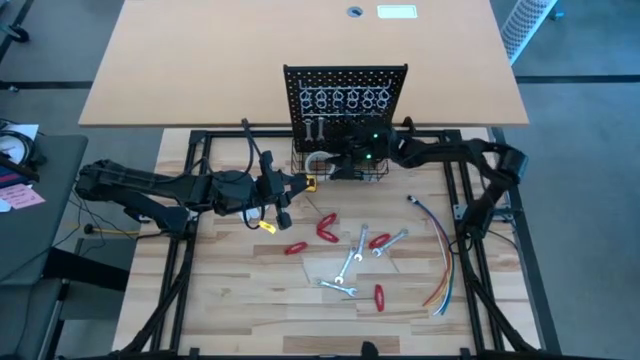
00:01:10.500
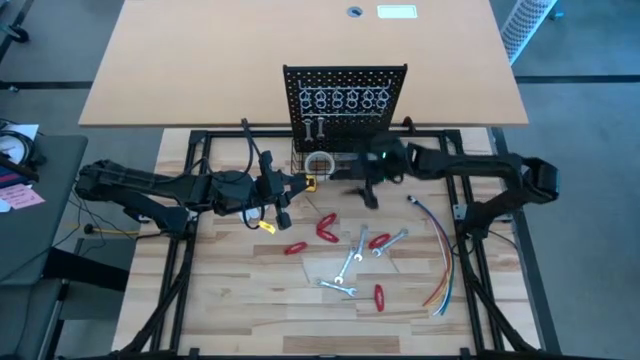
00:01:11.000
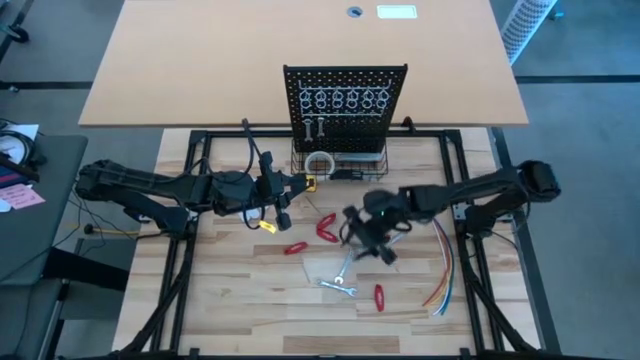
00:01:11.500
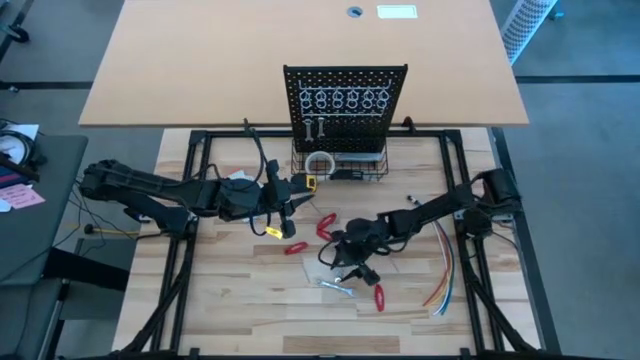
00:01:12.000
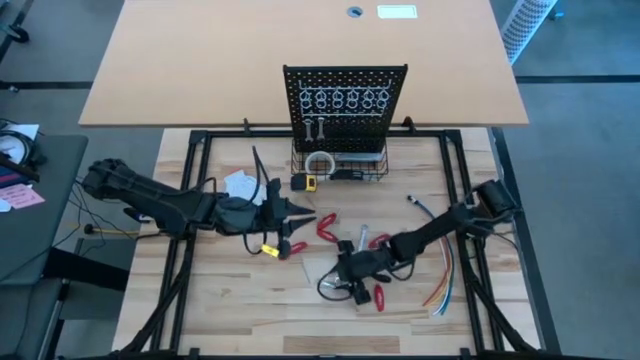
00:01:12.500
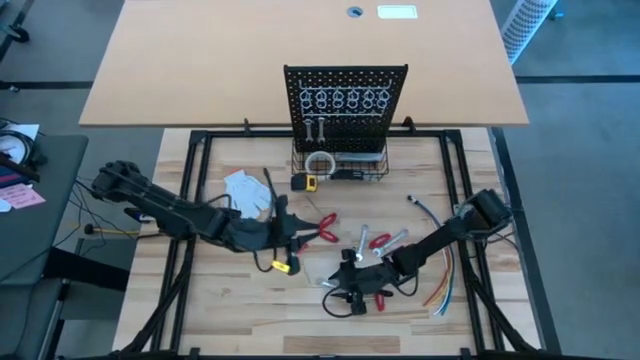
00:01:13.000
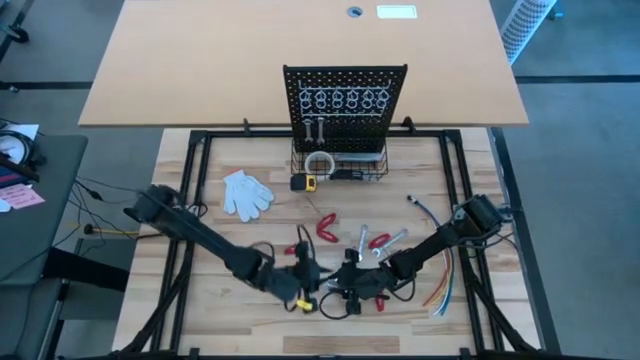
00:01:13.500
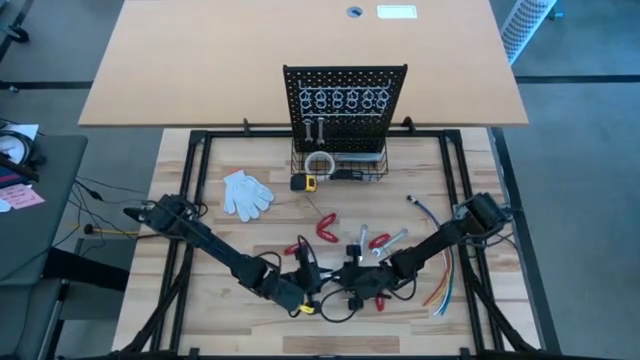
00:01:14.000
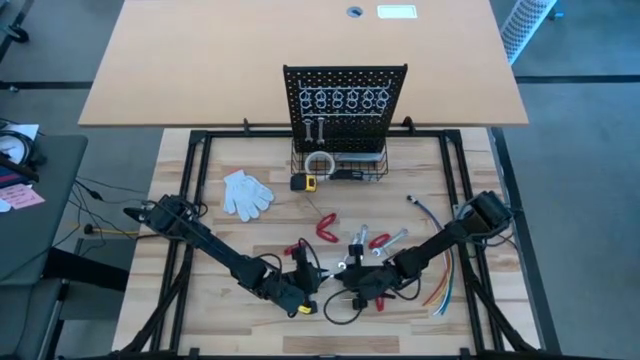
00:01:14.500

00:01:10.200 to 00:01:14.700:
Task: Hang tools onto peg board
Hang the silver wrench on the peg board

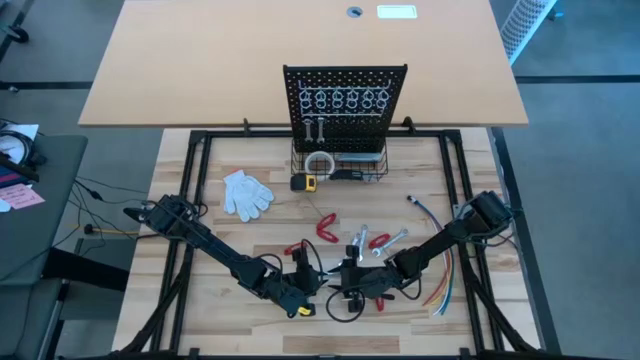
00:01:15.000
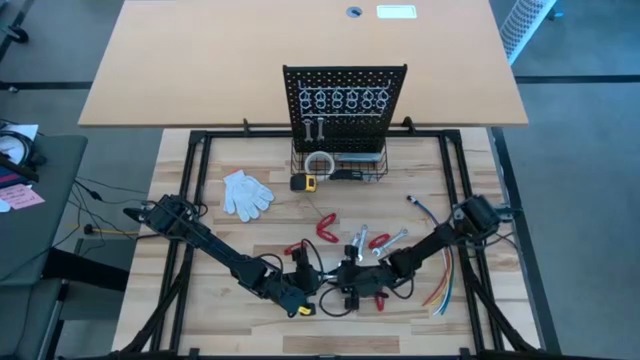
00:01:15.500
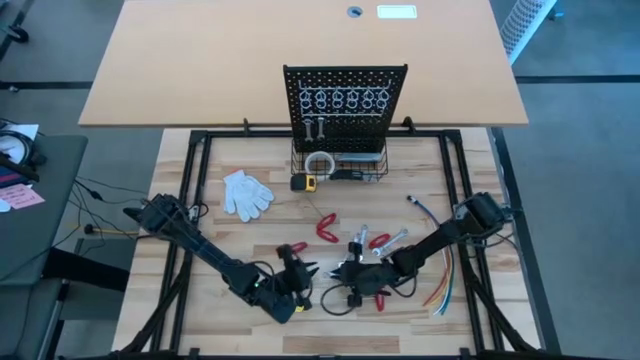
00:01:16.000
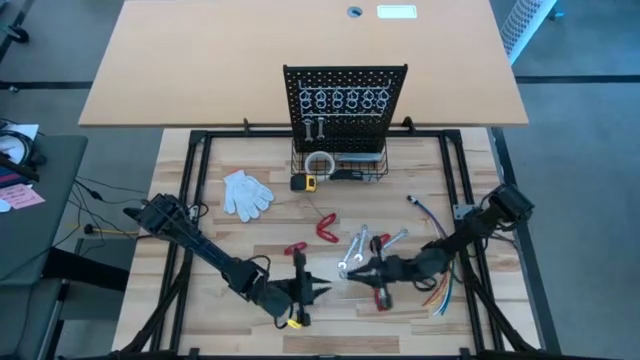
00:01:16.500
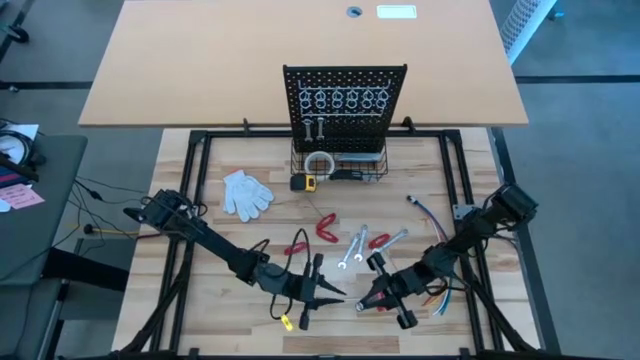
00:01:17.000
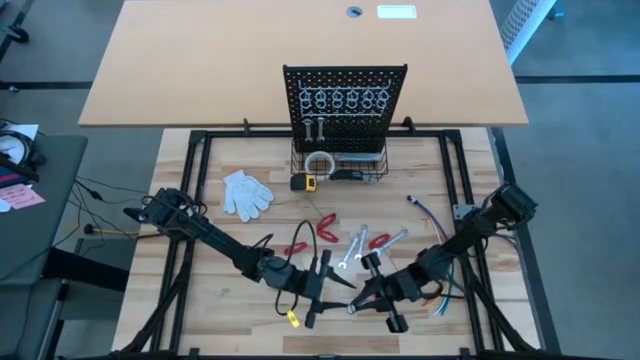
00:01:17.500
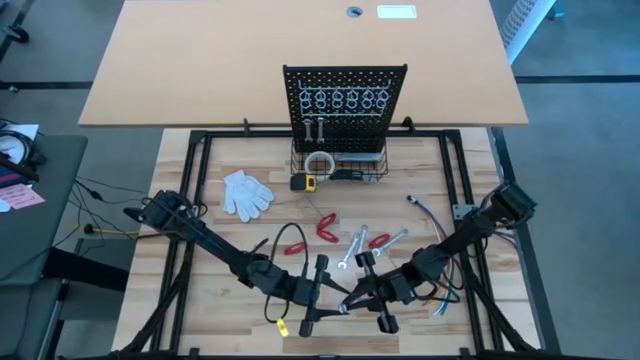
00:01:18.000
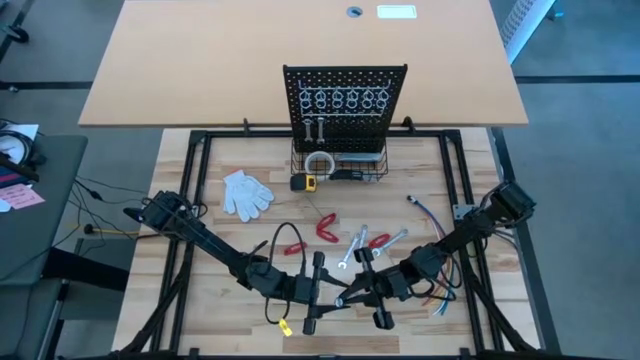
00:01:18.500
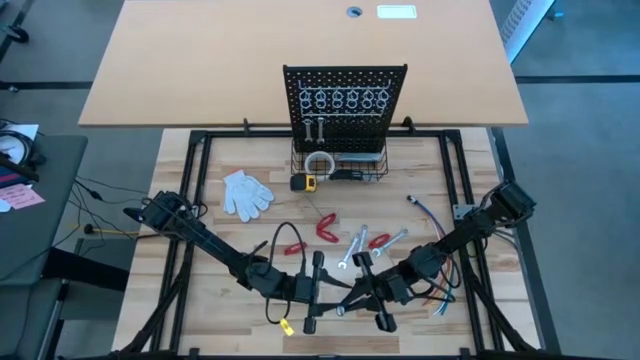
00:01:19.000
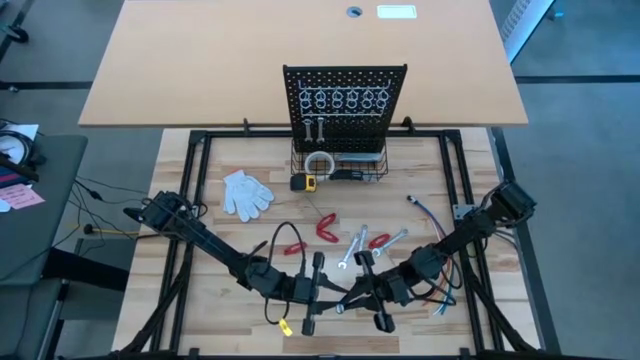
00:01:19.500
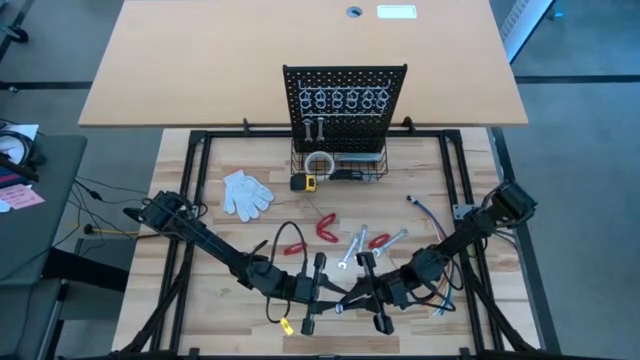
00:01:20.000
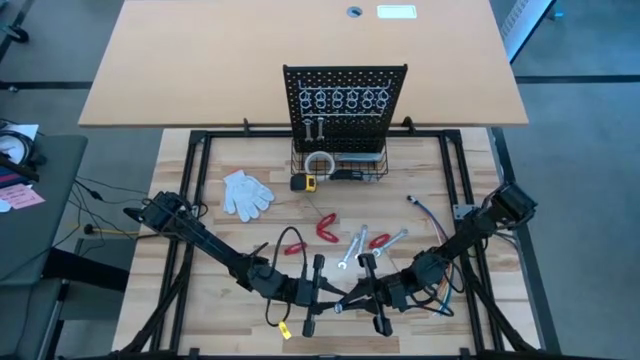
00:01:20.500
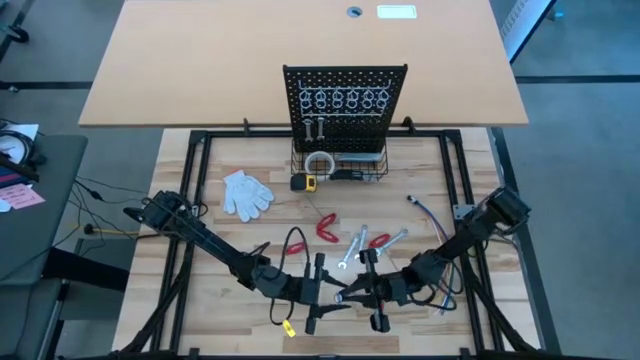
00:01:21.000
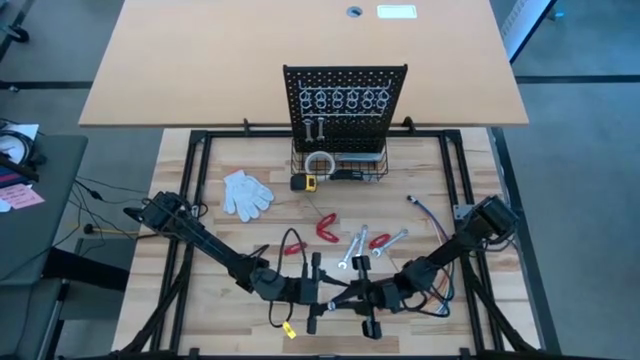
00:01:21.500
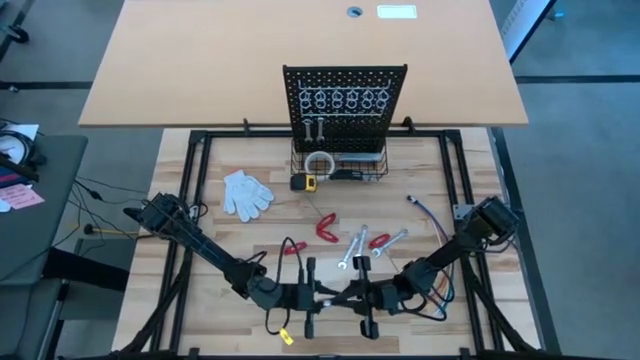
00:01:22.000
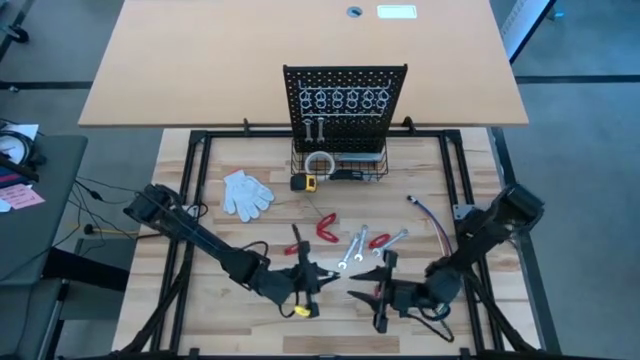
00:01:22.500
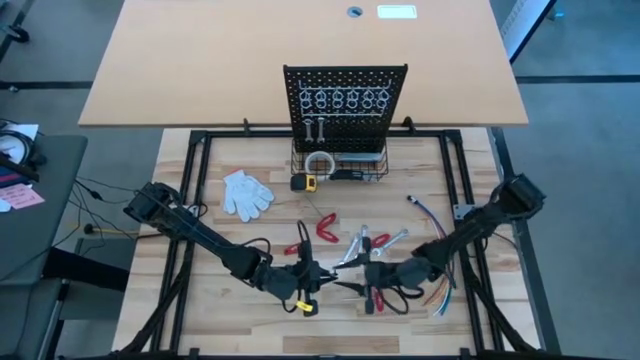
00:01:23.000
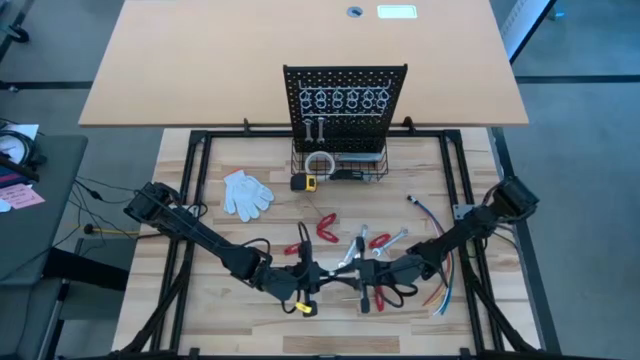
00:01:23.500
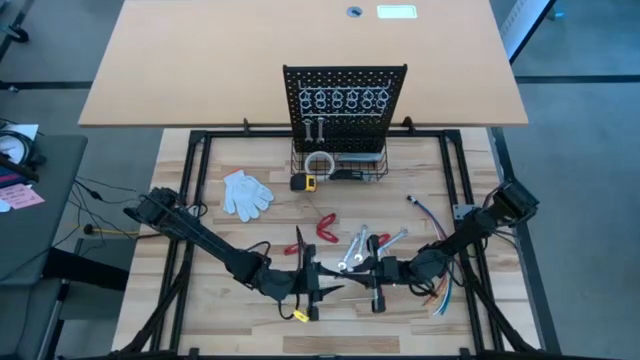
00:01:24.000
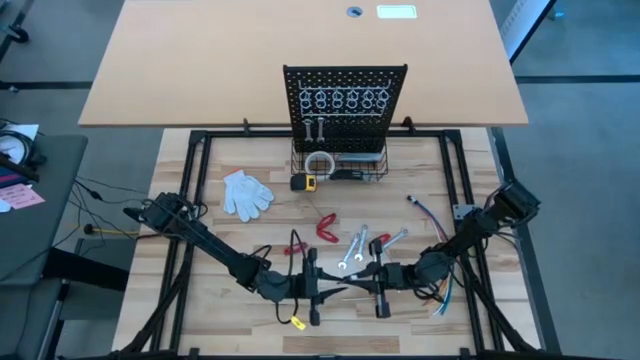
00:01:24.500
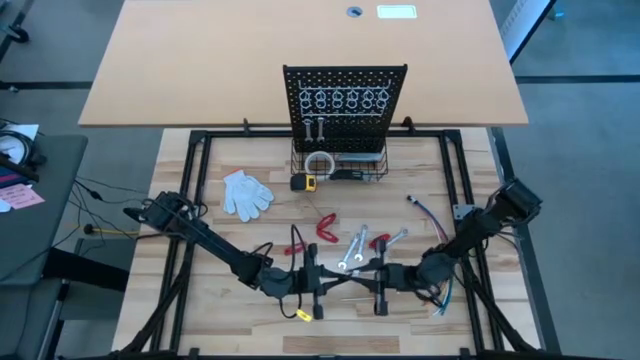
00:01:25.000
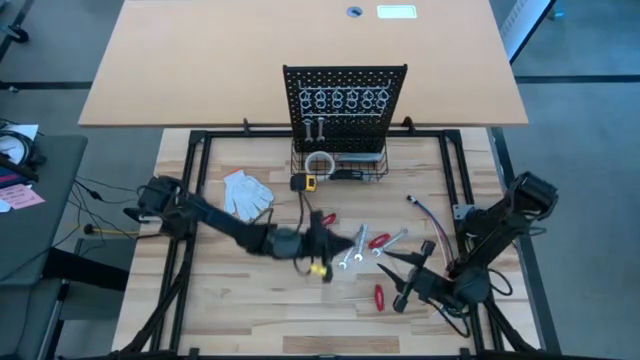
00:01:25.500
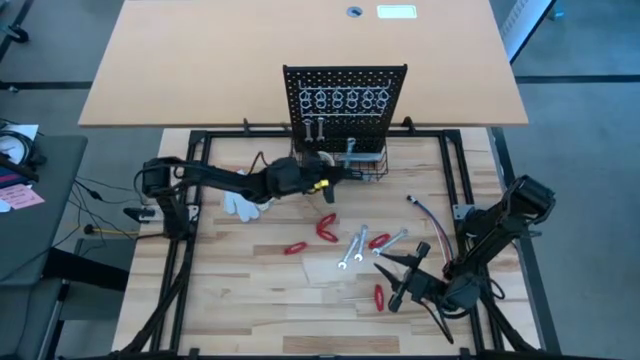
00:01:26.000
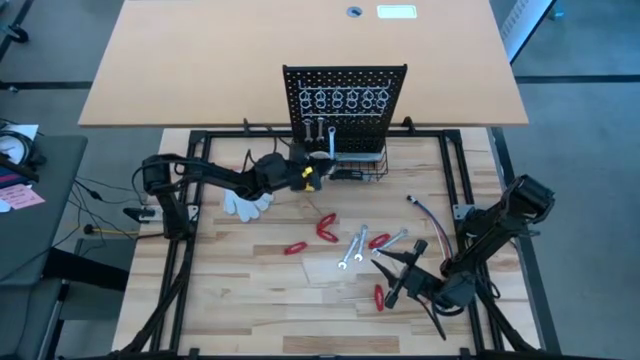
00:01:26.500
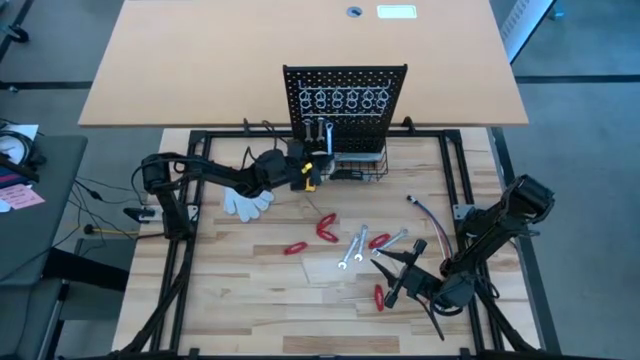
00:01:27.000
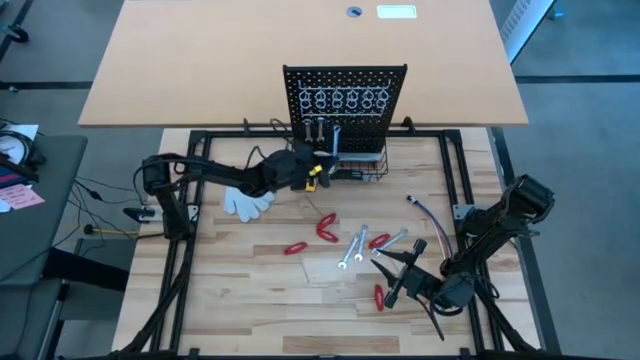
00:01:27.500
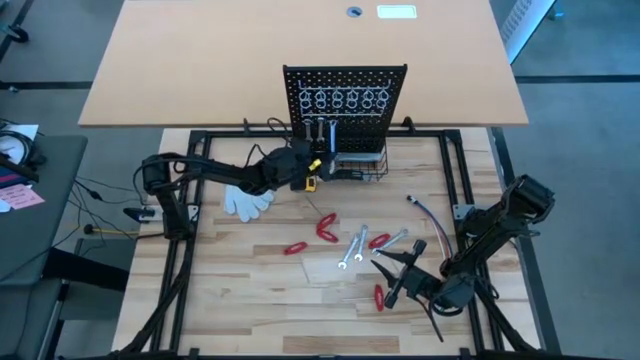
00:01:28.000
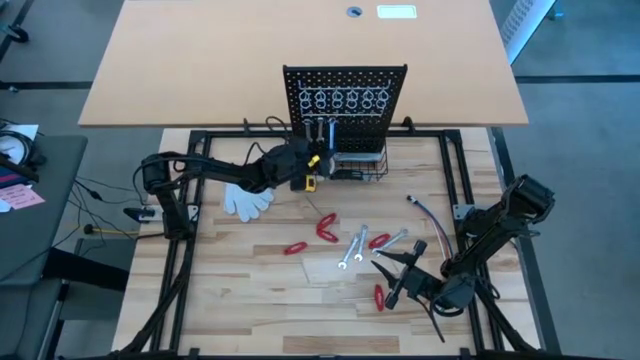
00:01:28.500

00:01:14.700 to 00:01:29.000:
Hang the silver wrench on the peg board

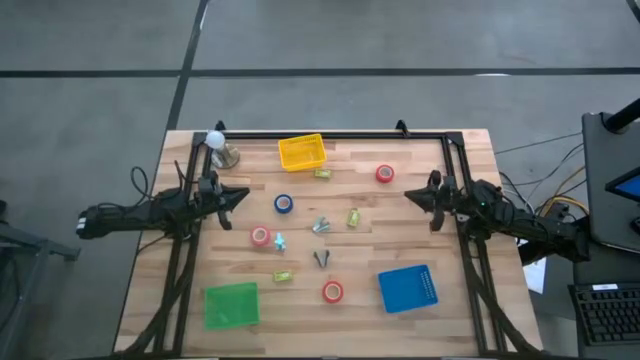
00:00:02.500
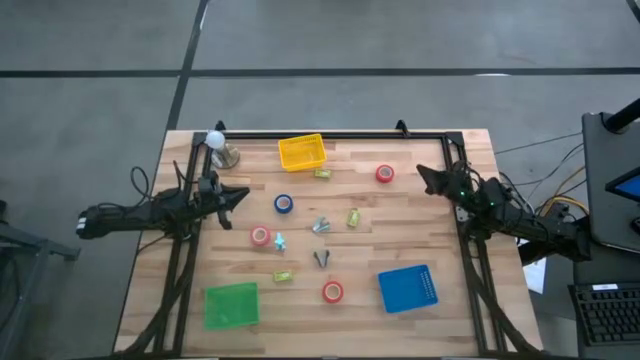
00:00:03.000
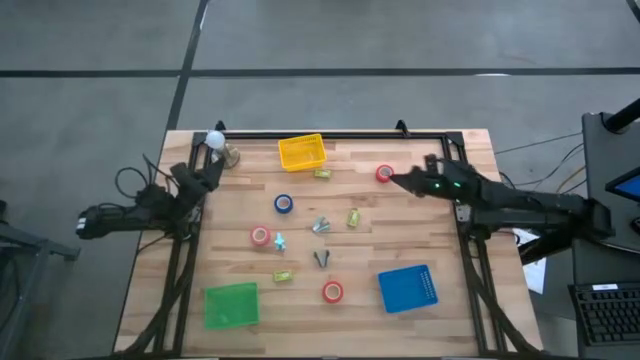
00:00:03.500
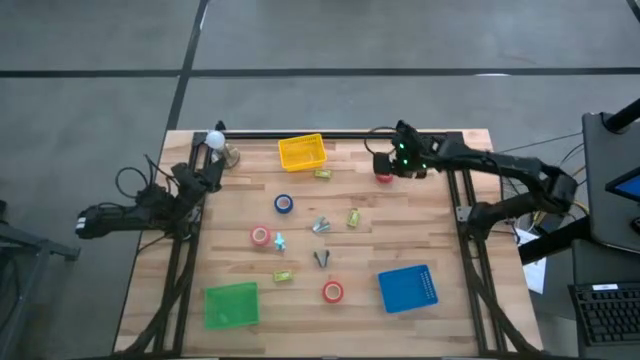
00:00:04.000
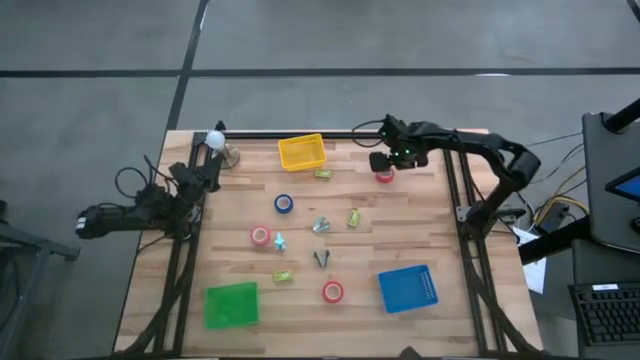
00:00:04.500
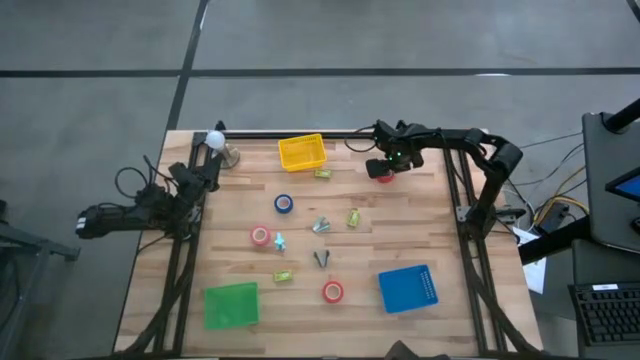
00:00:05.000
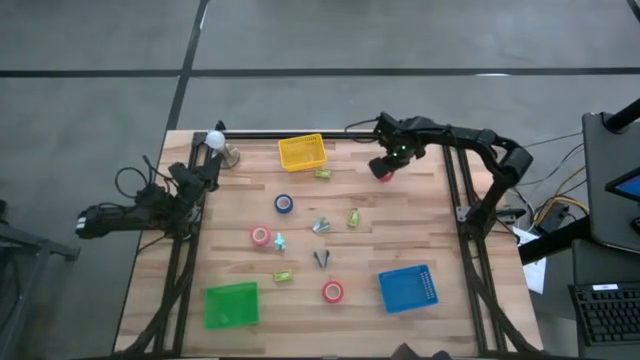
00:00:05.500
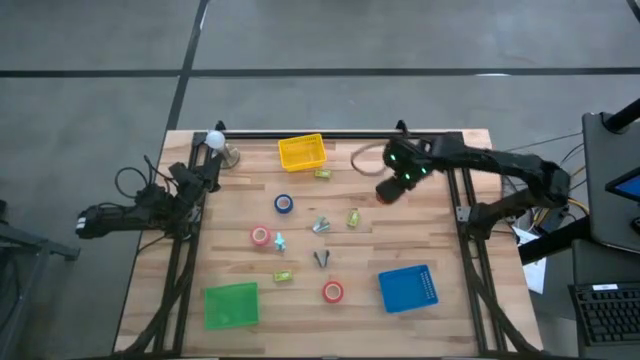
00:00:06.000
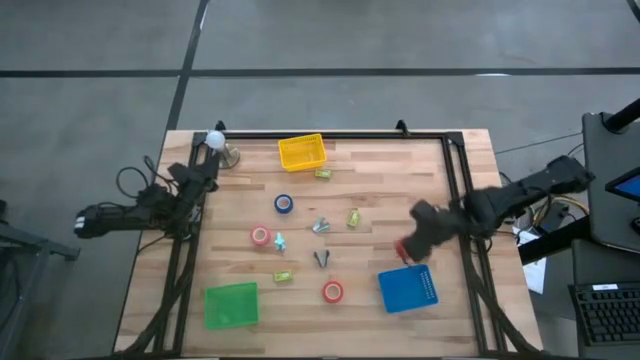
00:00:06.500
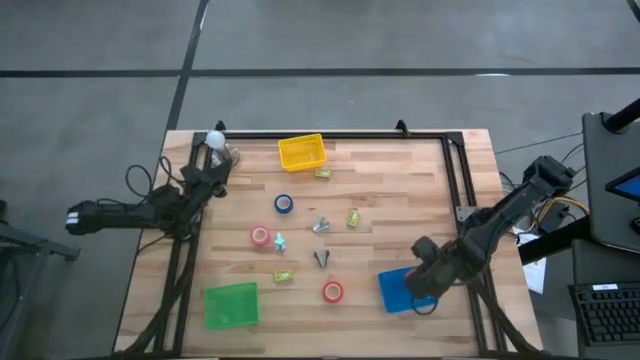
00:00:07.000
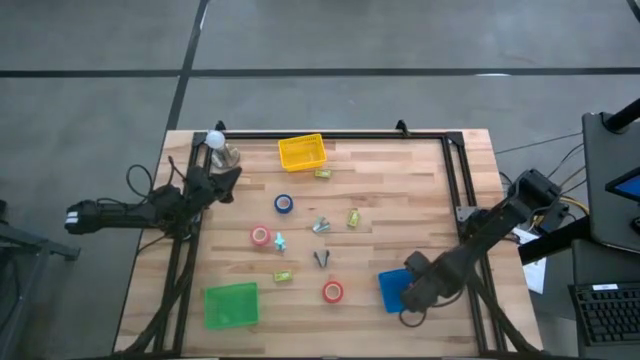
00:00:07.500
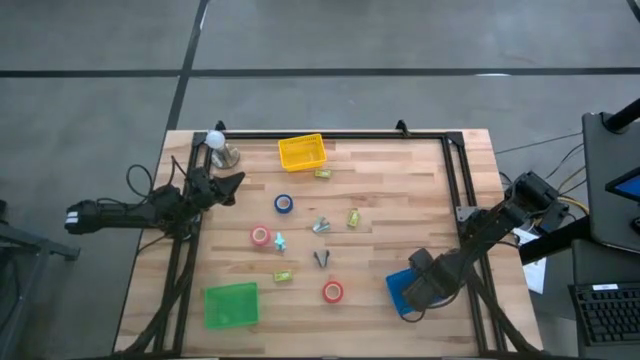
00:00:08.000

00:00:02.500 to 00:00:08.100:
Task: Pick and place Stapler, Stapler remover, tape
Put the top orange tape into the blue basket
